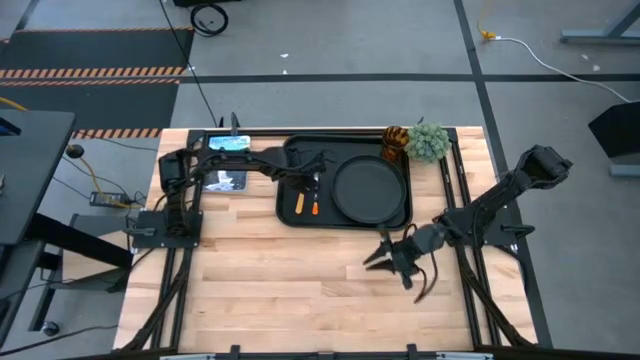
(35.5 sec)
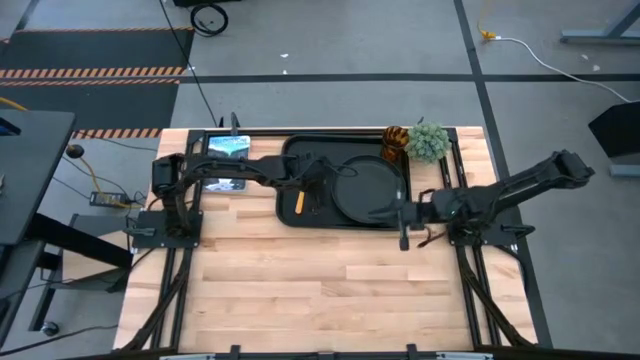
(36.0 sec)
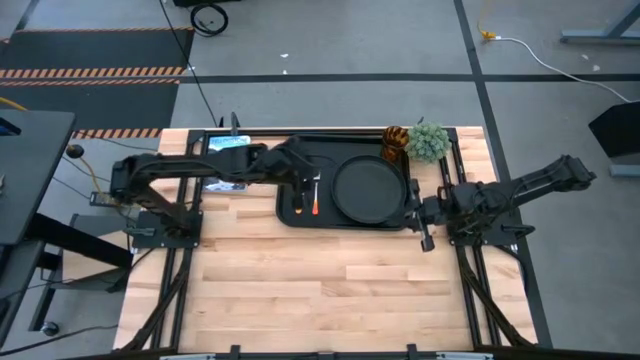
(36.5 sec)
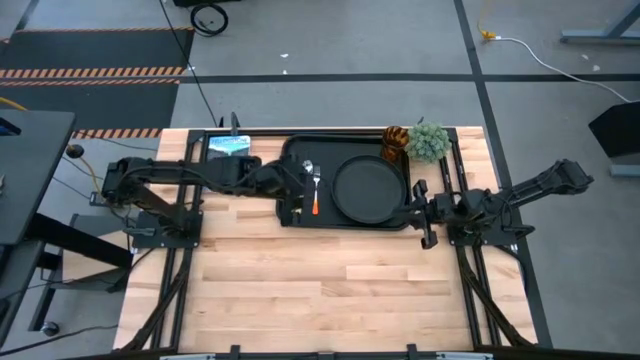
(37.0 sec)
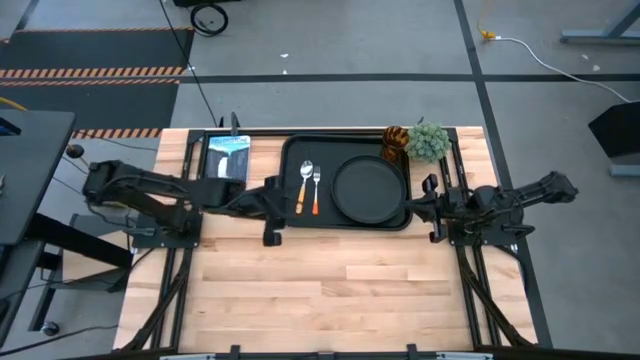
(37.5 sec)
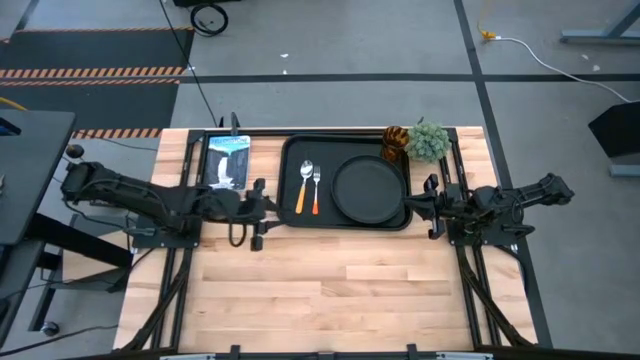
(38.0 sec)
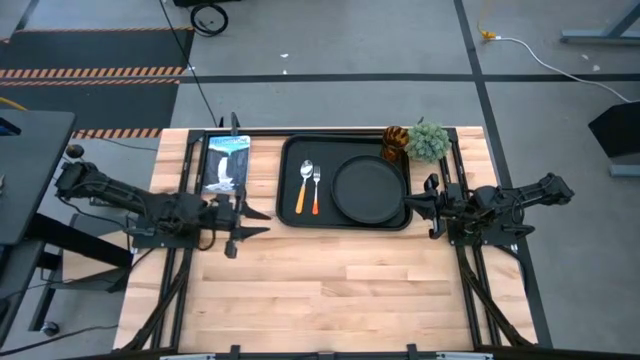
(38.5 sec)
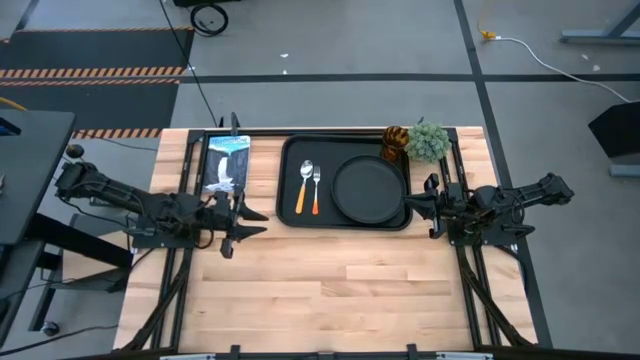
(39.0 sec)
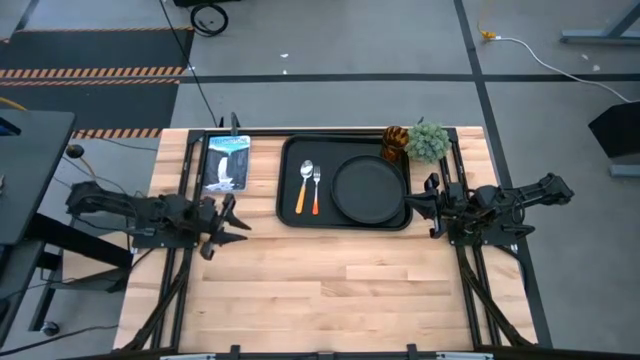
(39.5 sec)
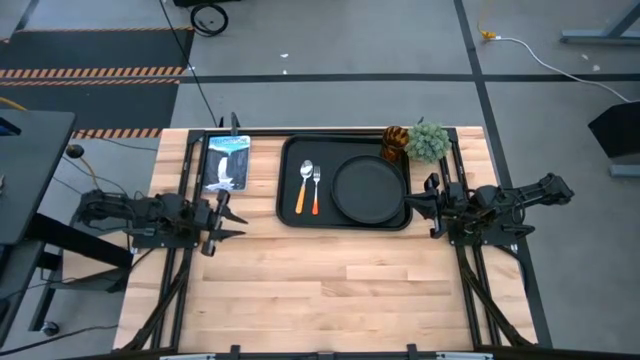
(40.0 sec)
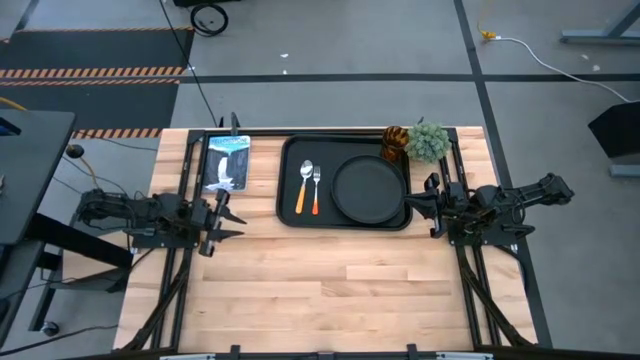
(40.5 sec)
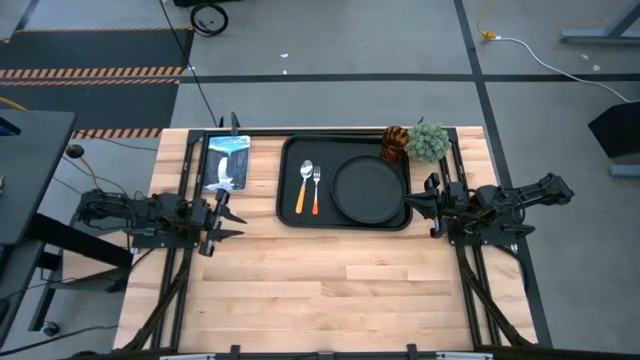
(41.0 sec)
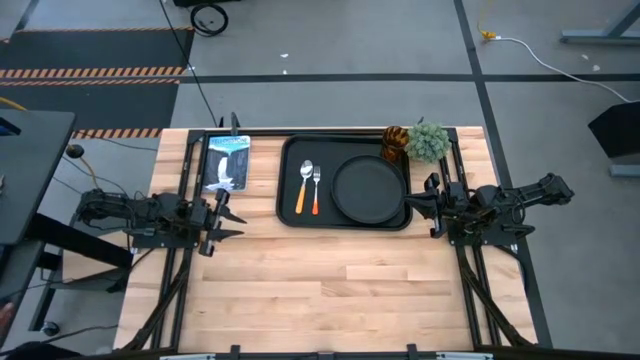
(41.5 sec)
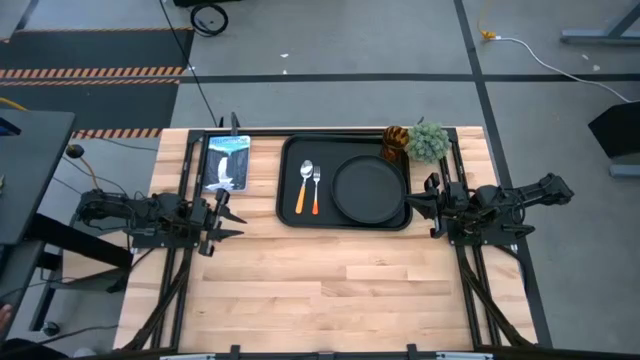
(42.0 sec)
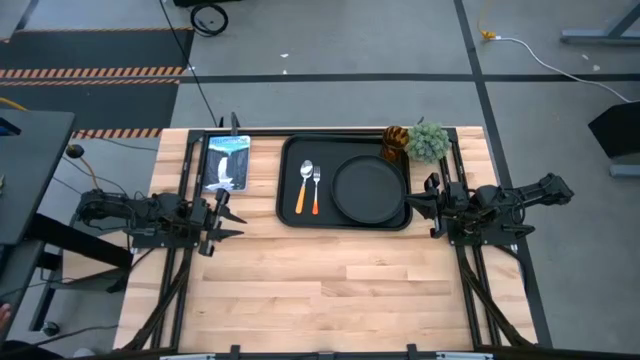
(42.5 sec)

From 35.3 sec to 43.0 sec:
Task: Pick and place plate/cup/fork/spoon on tray
Return to Home Position

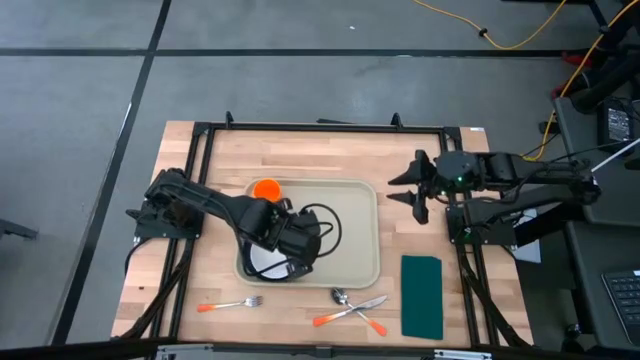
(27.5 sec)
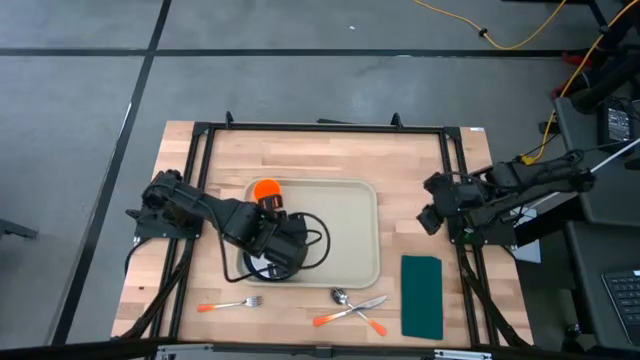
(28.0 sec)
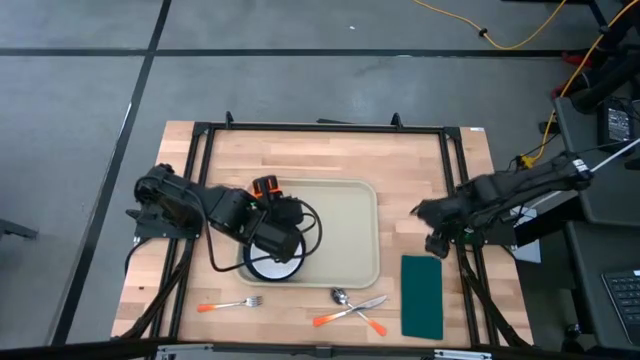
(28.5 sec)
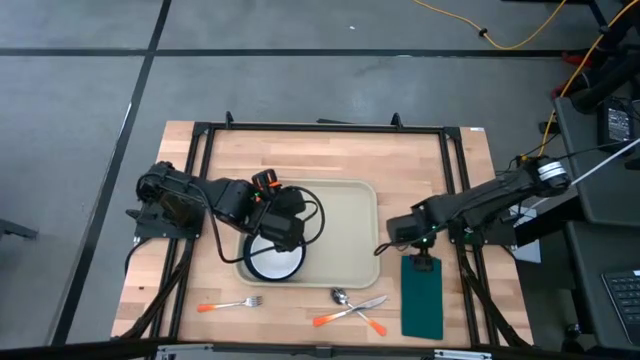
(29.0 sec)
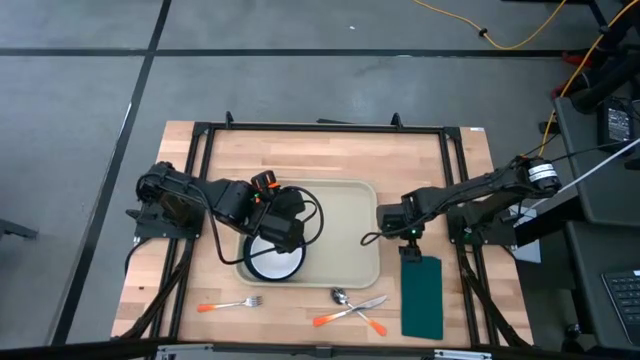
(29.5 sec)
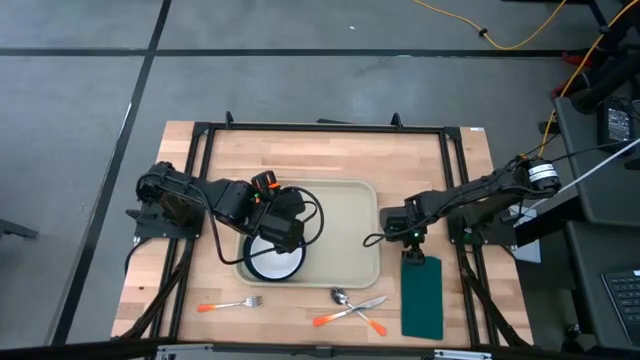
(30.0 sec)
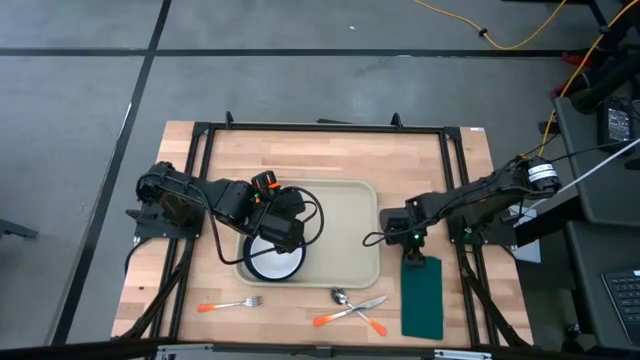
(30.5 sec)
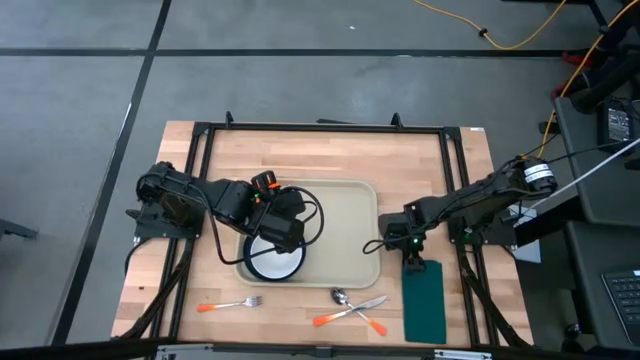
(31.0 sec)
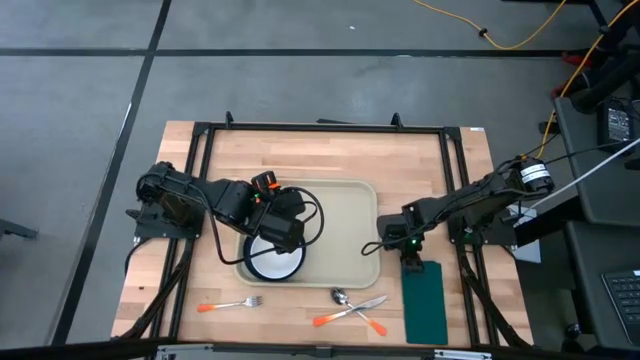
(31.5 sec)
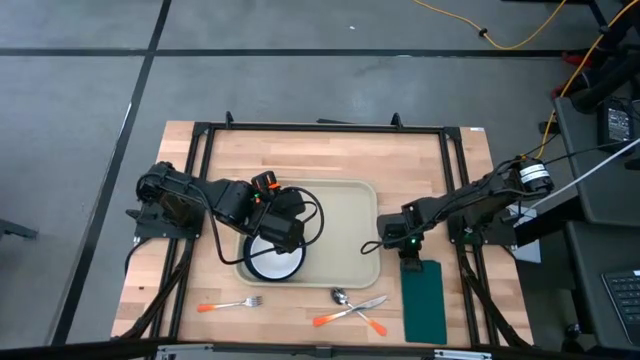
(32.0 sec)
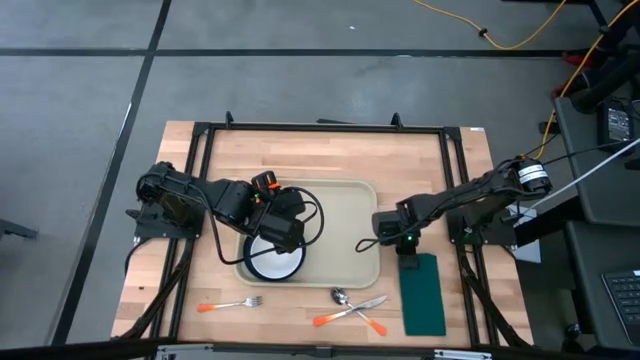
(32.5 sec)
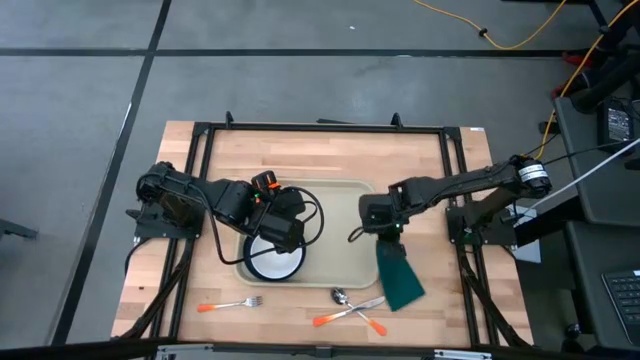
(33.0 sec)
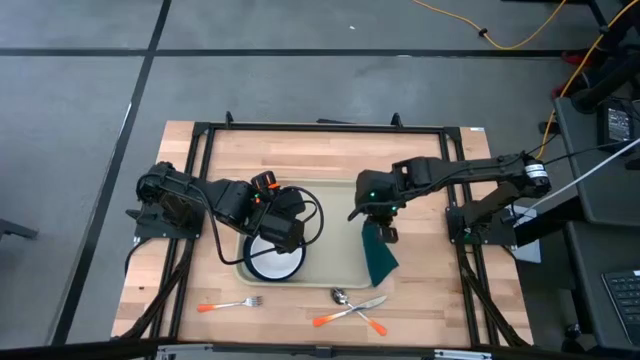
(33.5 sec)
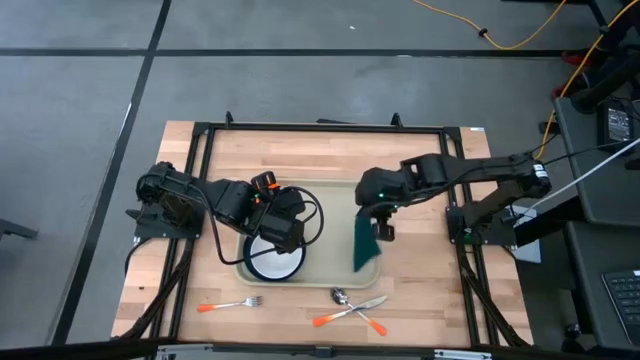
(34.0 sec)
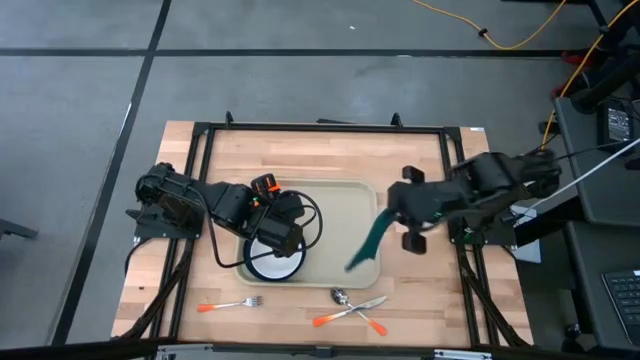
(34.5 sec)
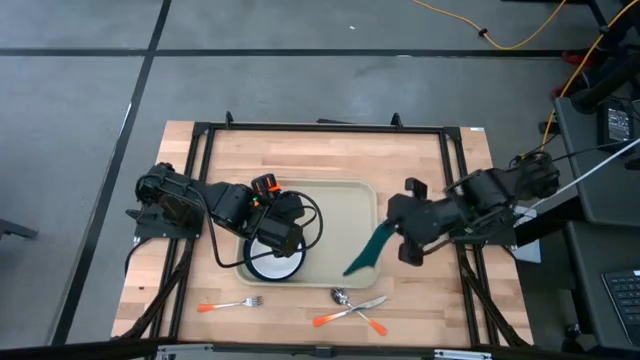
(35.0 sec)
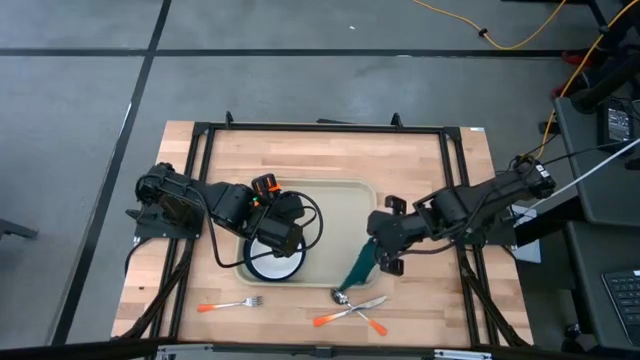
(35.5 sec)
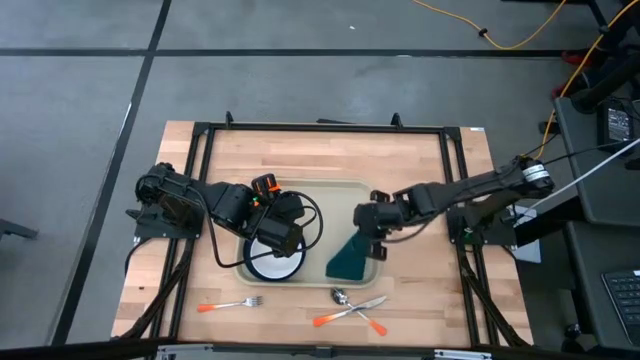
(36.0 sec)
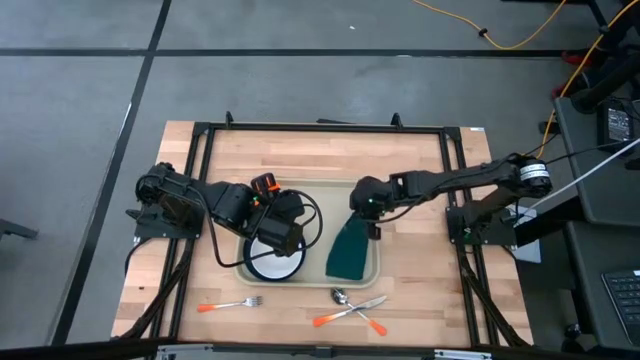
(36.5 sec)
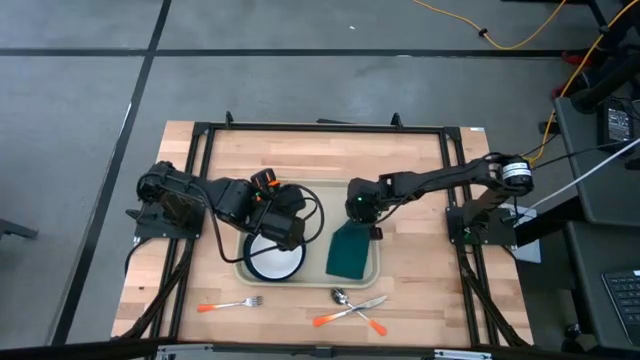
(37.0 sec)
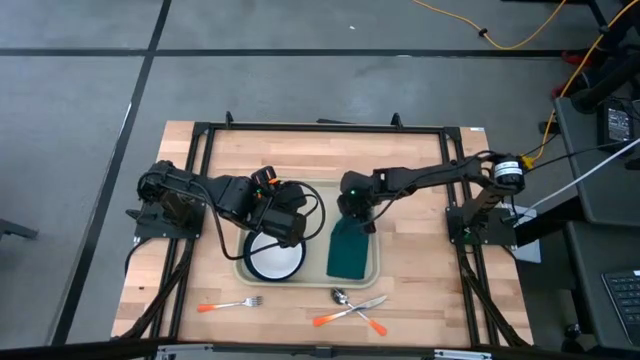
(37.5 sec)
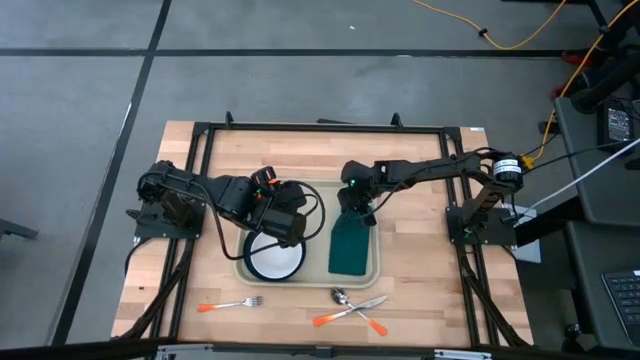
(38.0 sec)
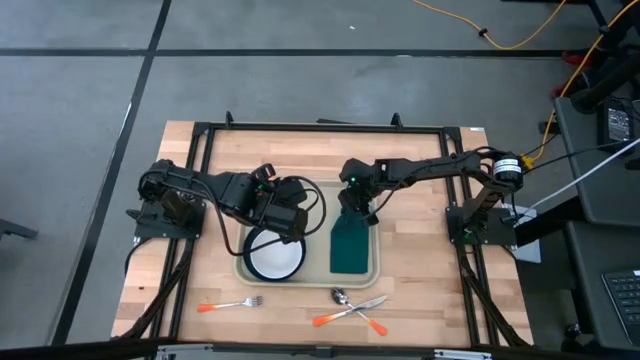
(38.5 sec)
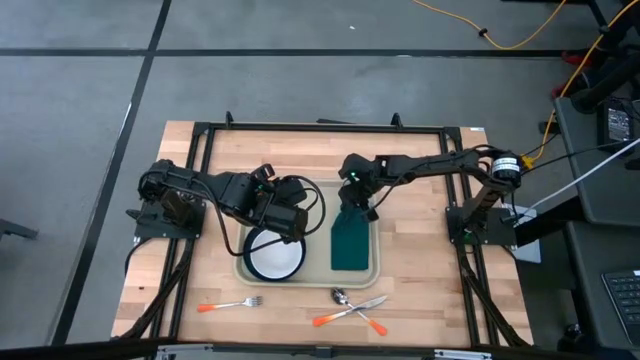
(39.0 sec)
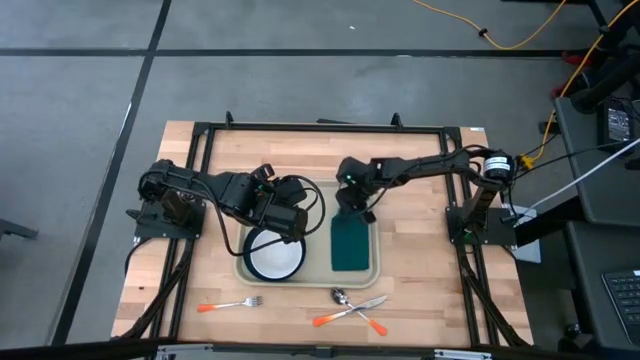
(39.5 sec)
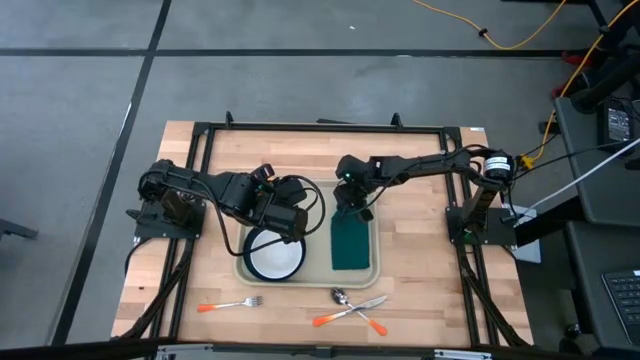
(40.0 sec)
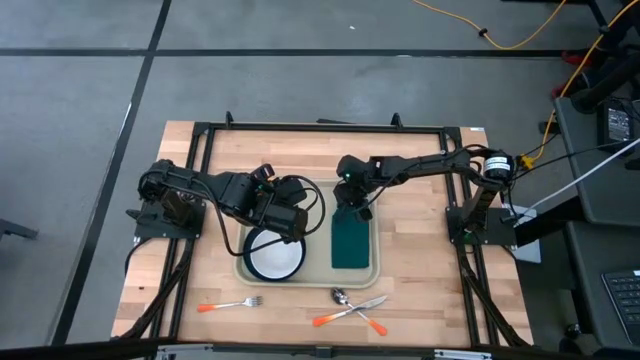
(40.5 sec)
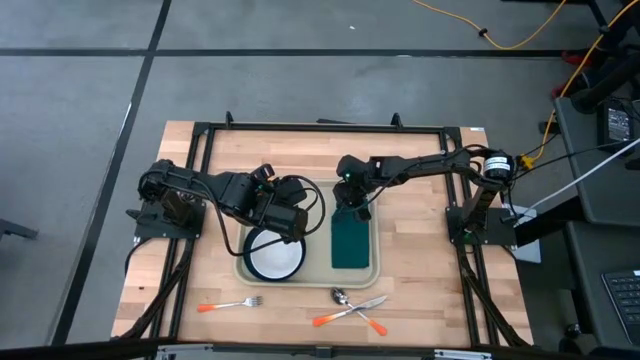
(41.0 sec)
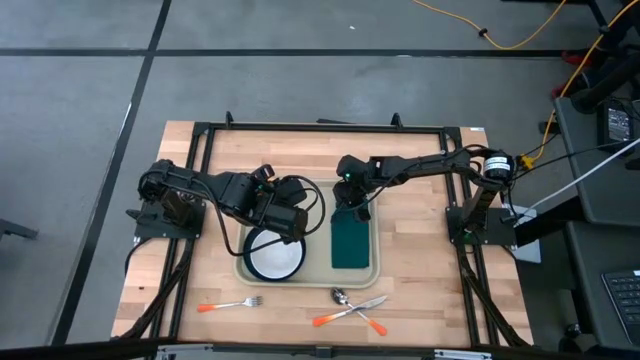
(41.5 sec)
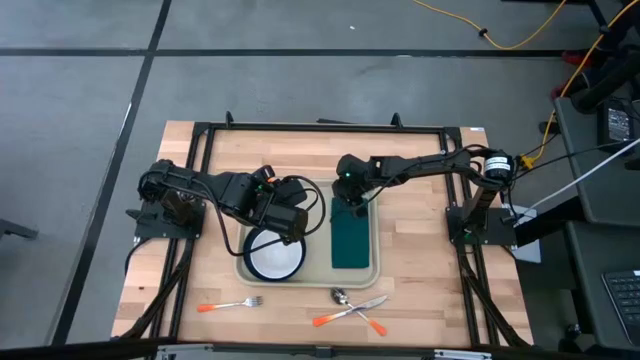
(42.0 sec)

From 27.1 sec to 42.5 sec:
Task: Set up tray
Put the dark green napkin on the gray tray
